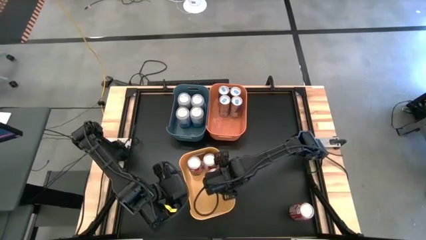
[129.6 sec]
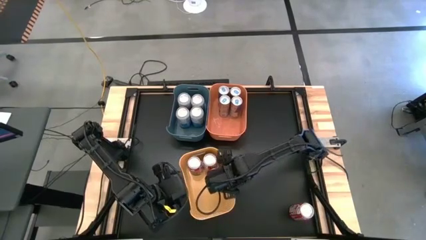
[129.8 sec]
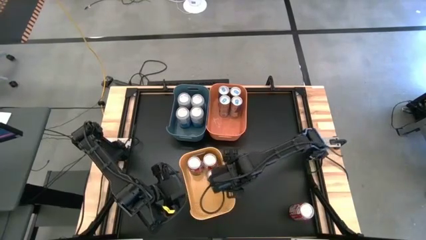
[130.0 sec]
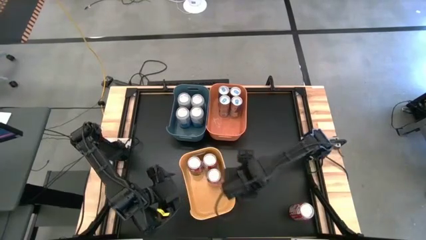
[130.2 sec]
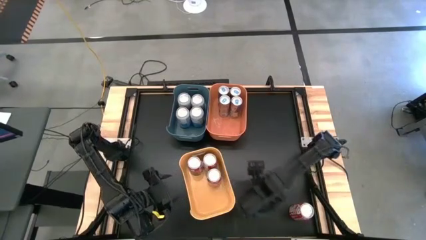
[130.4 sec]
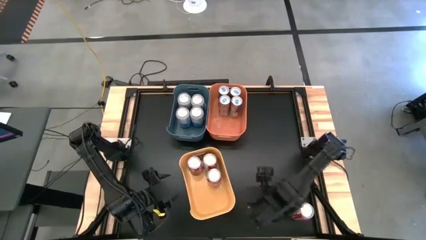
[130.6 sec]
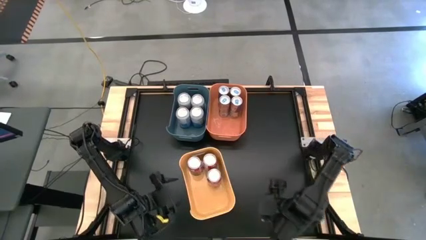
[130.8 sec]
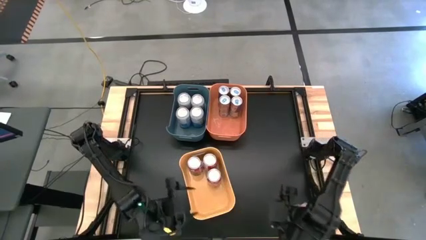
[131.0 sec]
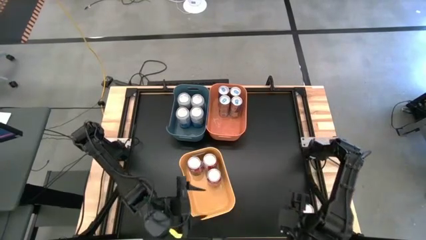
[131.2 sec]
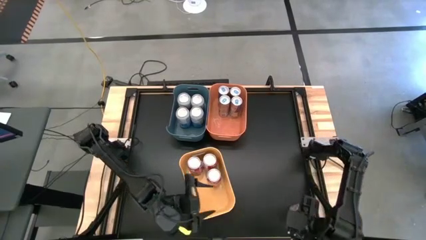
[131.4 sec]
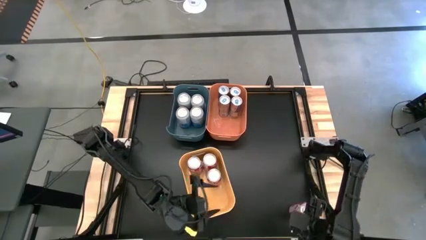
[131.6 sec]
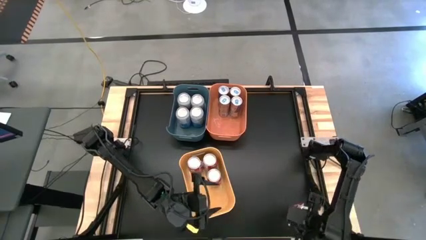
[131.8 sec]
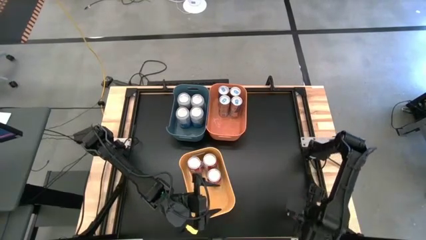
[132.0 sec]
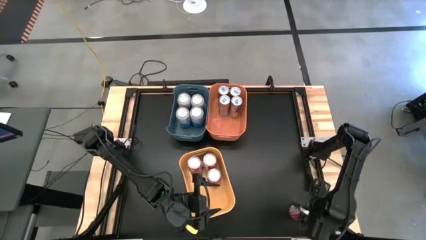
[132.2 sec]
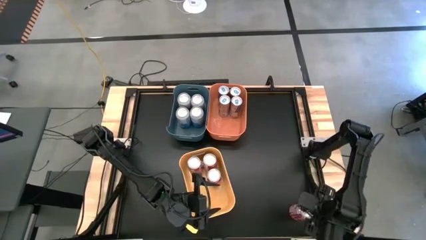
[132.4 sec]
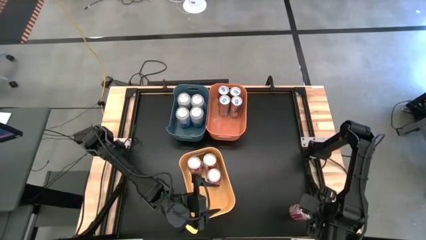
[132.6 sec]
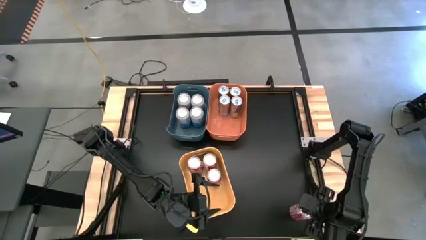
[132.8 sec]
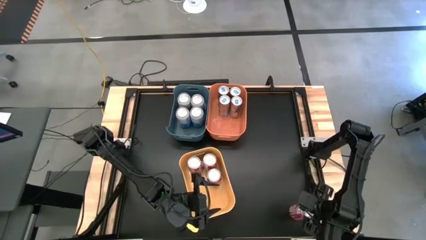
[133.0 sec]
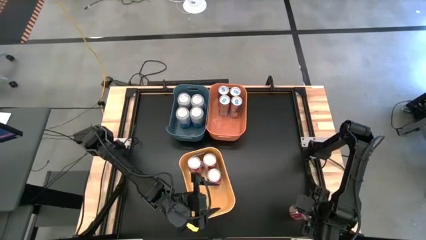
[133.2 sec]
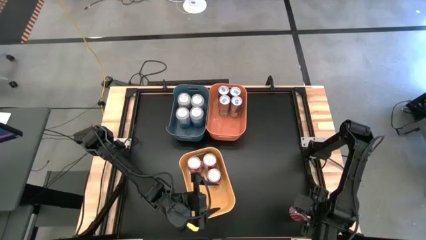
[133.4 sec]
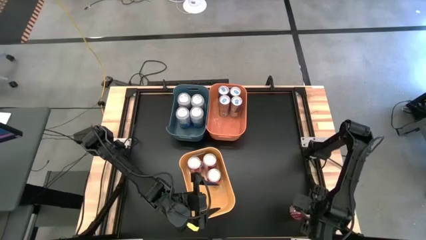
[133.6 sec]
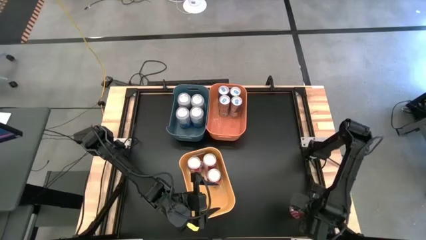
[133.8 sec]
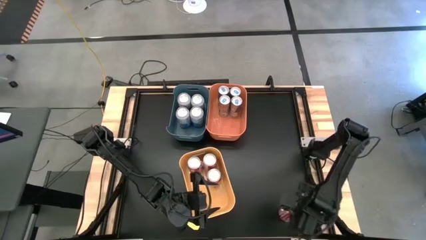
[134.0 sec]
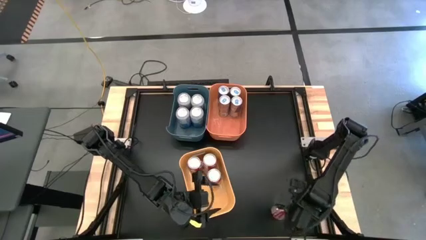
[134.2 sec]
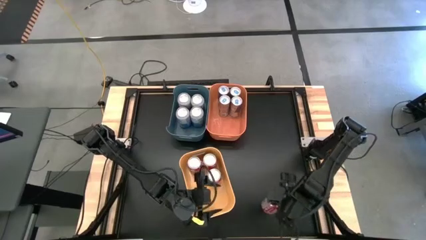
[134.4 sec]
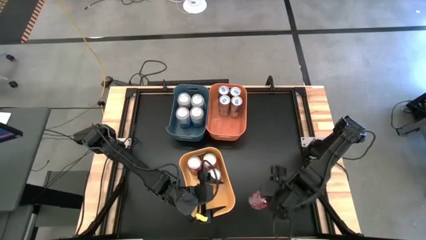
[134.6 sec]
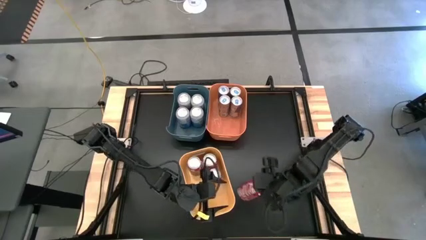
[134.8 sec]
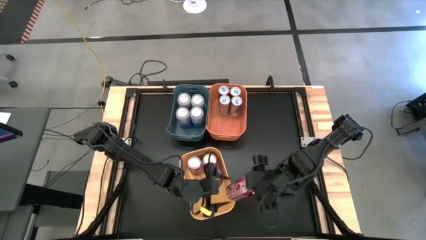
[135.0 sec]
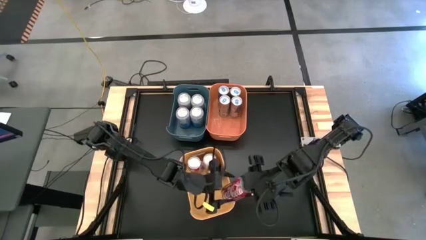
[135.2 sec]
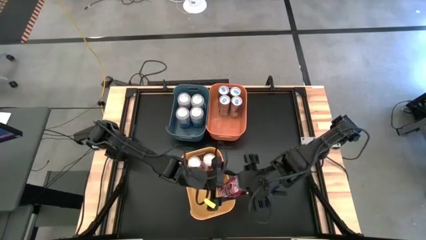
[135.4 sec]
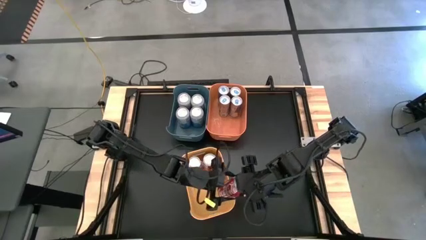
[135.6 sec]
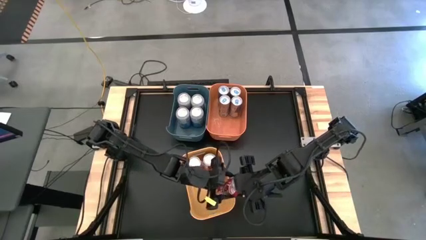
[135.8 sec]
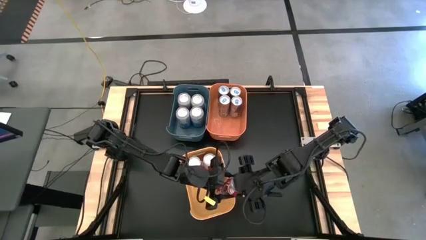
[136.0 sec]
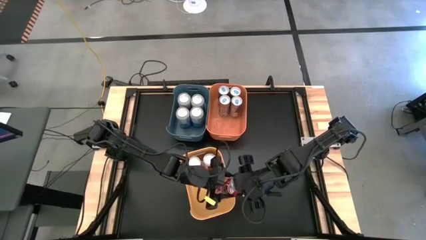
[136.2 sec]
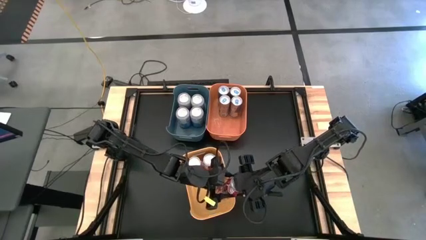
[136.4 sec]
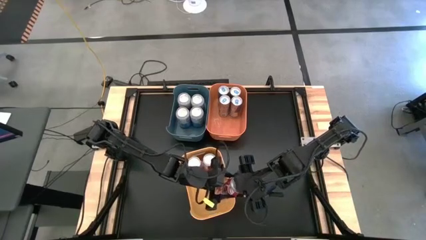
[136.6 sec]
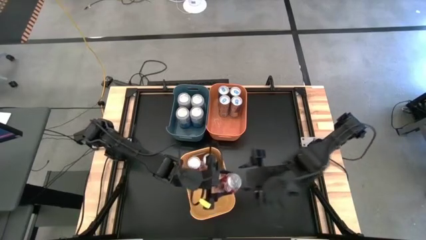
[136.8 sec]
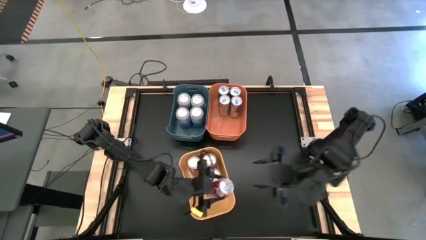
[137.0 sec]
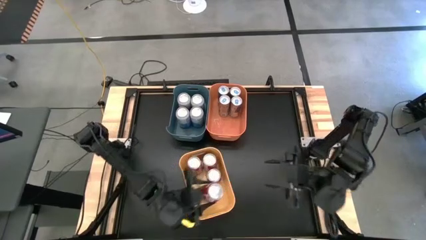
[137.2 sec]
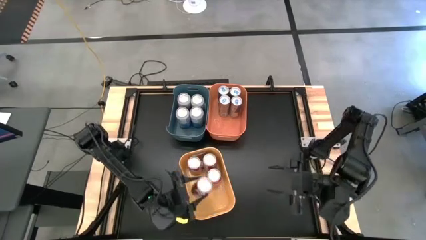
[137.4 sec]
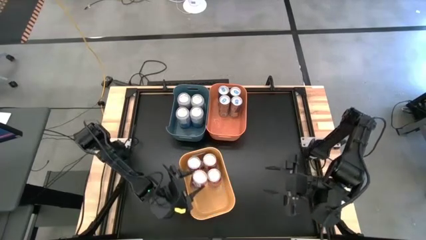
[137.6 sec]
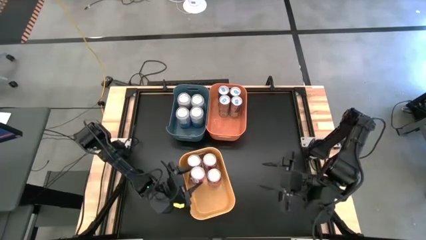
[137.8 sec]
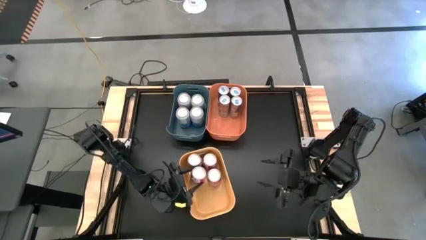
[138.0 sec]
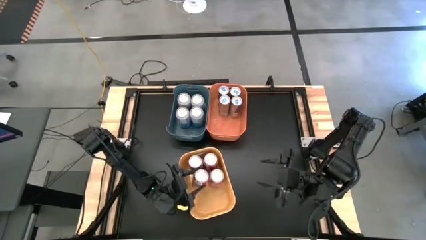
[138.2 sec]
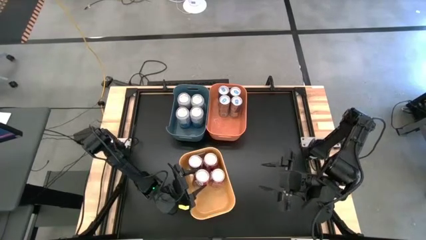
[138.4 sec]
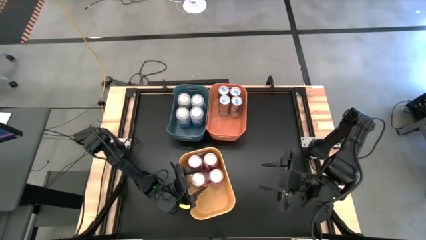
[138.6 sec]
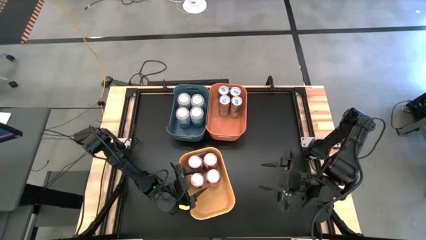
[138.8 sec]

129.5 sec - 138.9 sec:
Task: Sort soda cans
Put the red-white soda can into the yellow bin

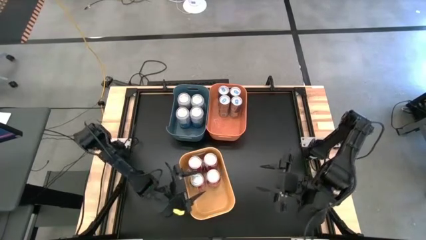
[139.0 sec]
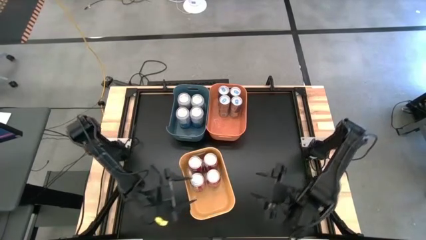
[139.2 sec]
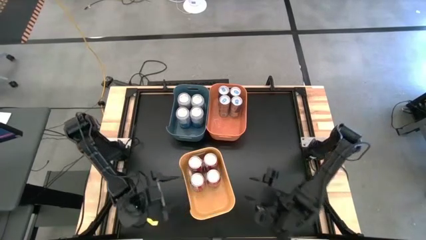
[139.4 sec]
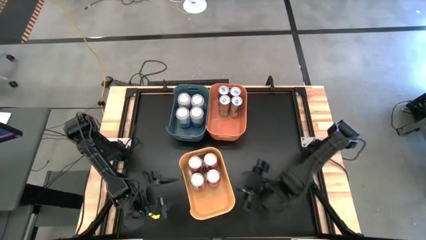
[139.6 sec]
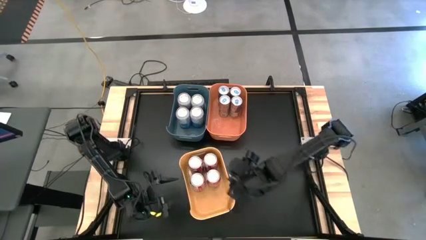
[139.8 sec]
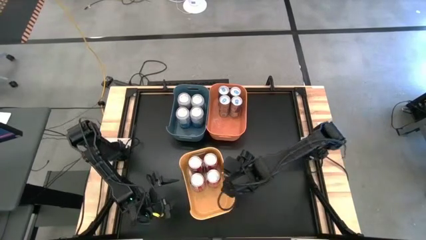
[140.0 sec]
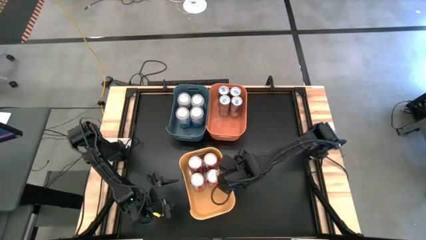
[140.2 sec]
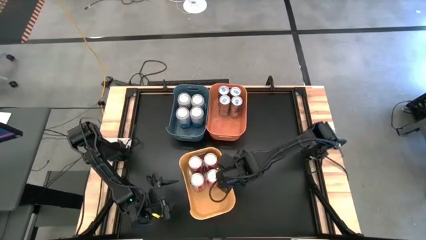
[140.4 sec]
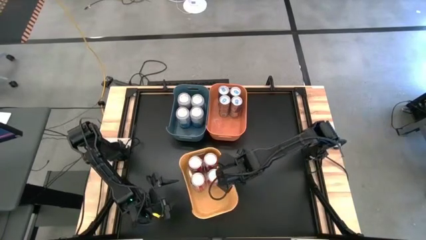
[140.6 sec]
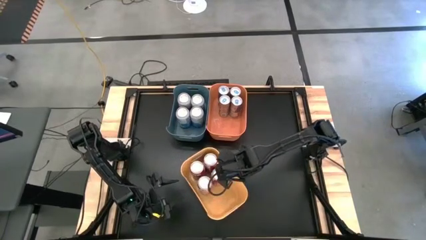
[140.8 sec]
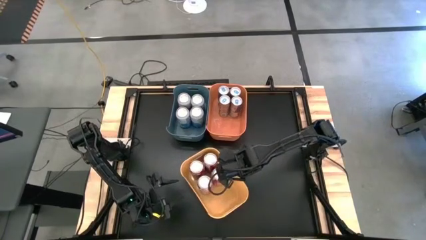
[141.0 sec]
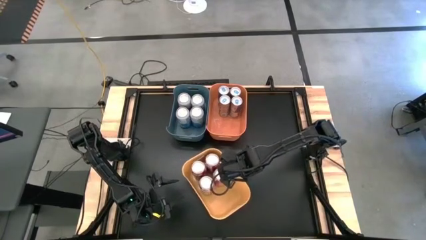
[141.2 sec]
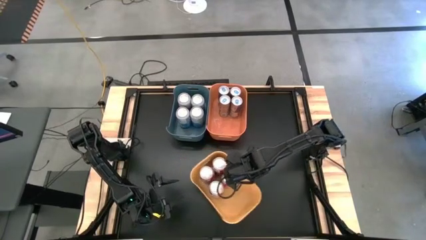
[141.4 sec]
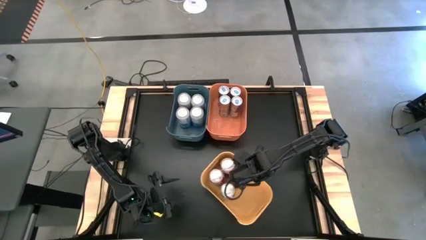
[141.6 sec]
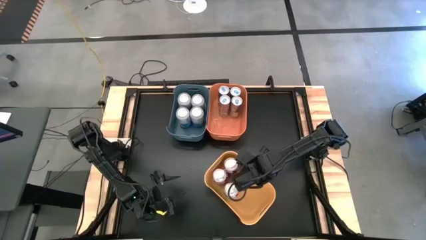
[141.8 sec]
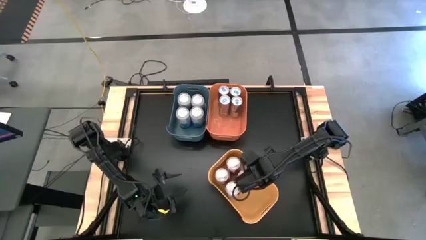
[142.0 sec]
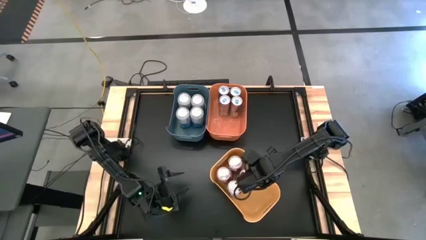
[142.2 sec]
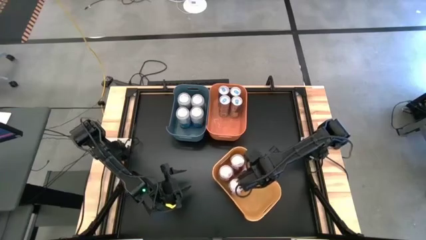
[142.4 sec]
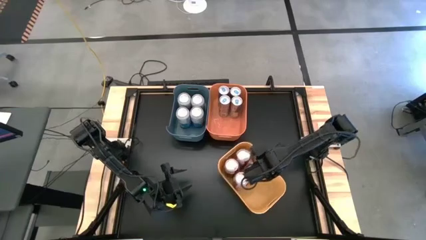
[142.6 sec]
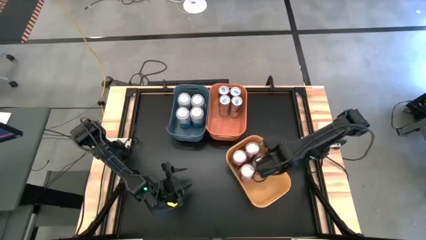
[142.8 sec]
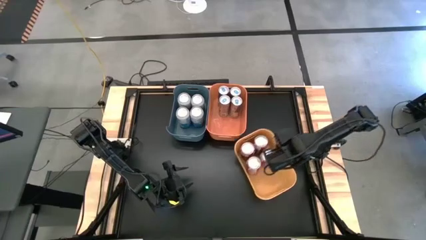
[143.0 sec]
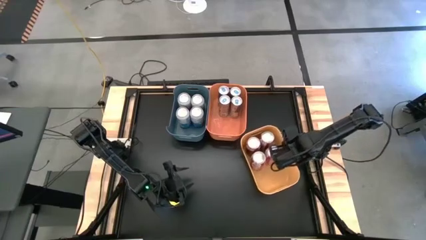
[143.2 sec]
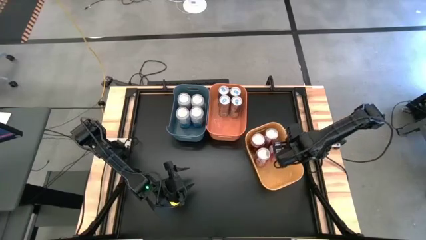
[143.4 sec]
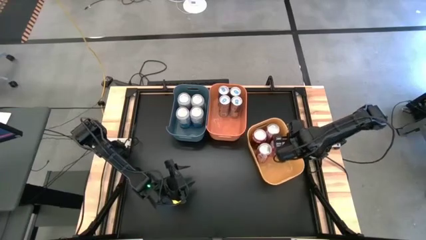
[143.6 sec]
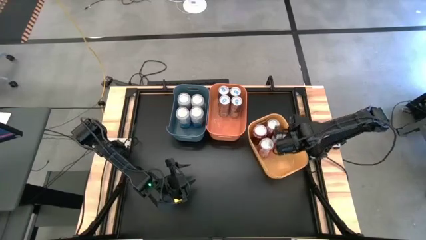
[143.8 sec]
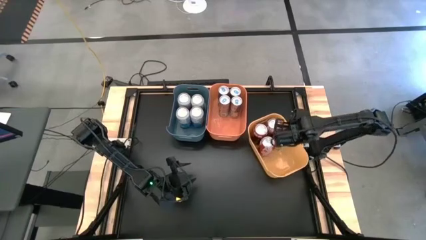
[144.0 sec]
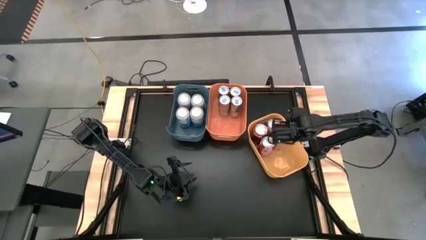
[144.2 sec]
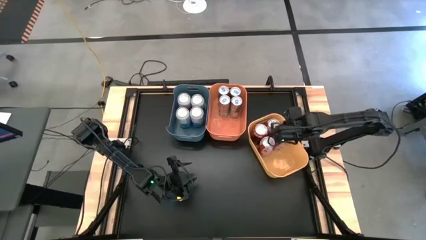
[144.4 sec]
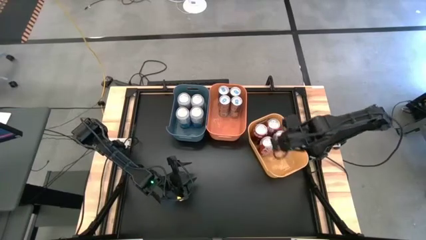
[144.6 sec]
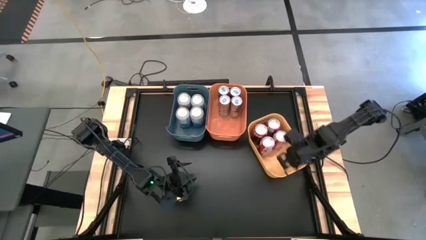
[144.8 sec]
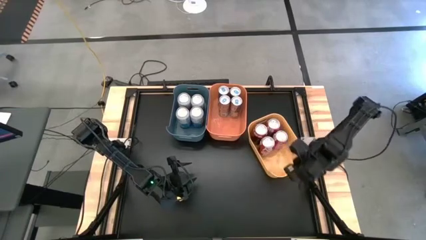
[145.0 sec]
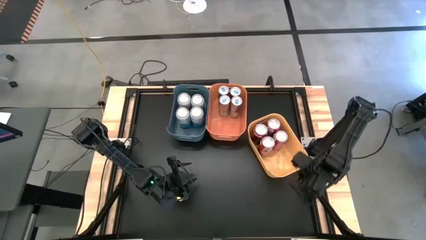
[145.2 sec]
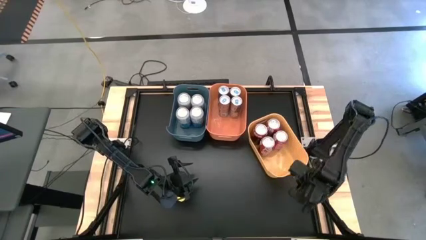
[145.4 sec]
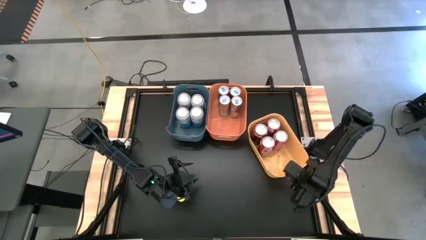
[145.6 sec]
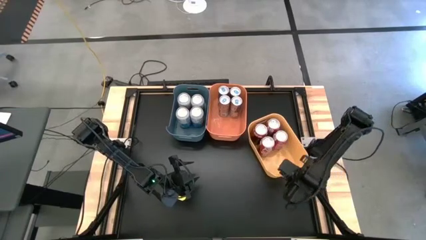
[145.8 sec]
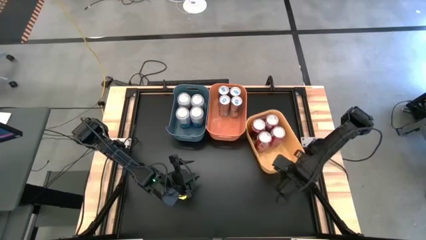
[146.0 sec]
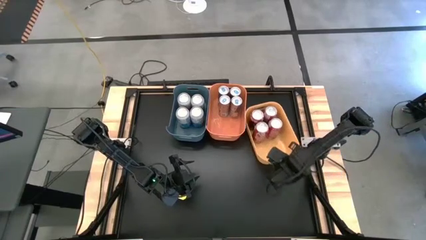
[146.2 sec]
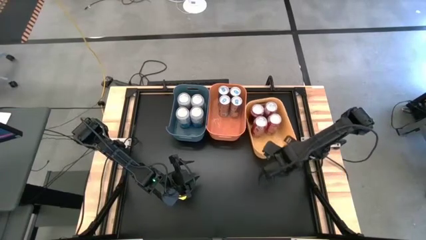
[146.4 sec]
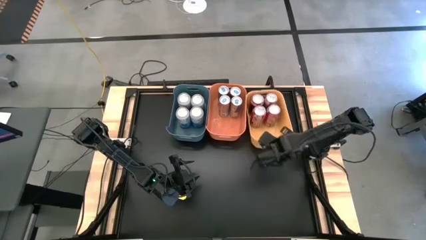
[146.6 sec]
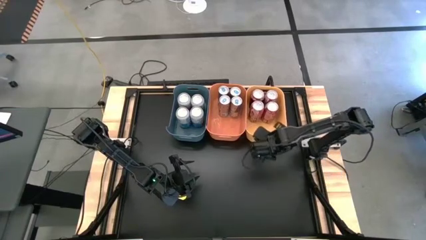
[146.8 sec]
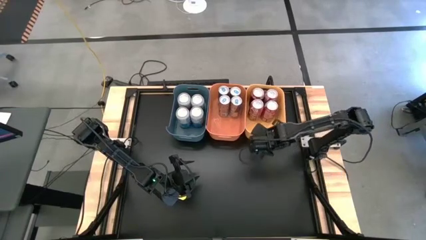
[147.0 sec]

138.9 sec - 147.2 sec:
Move the yellow bin to the top right of the table
